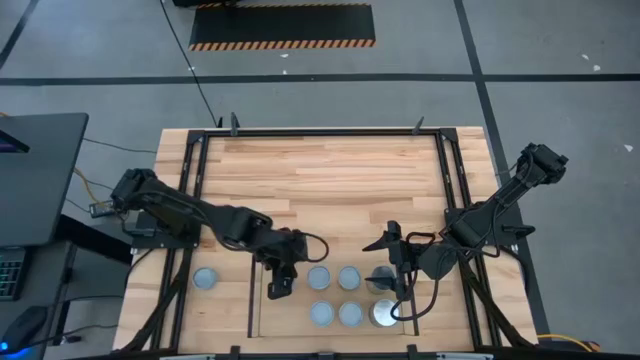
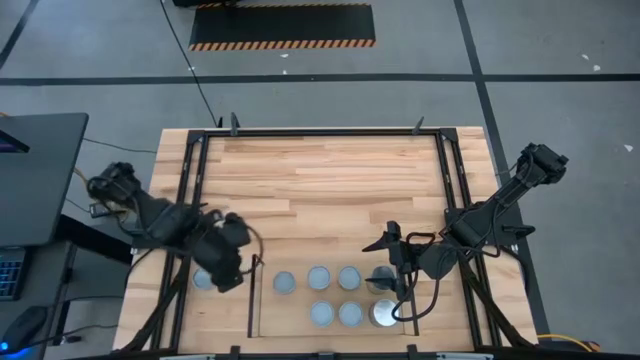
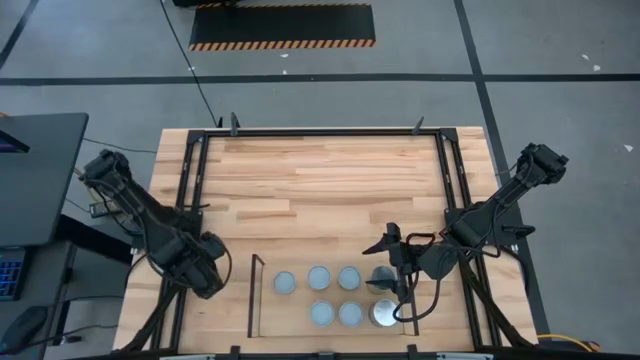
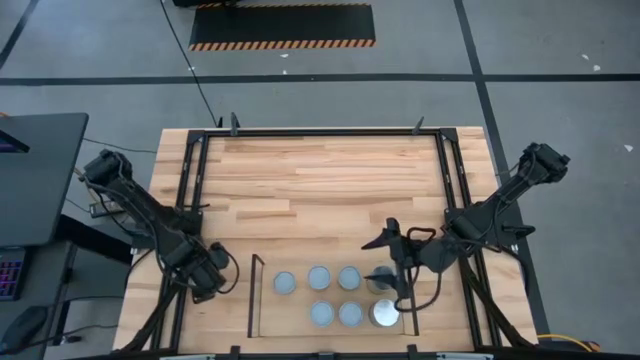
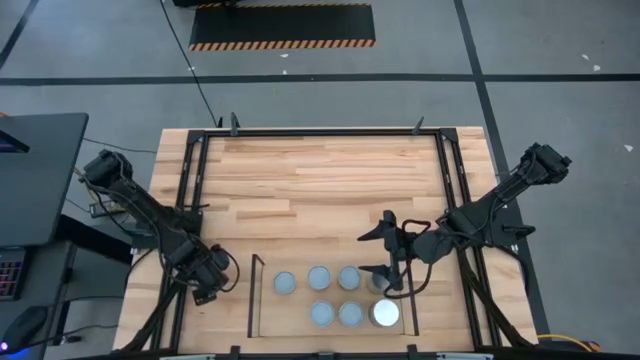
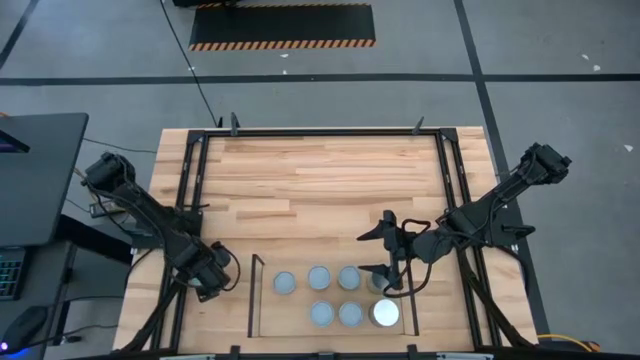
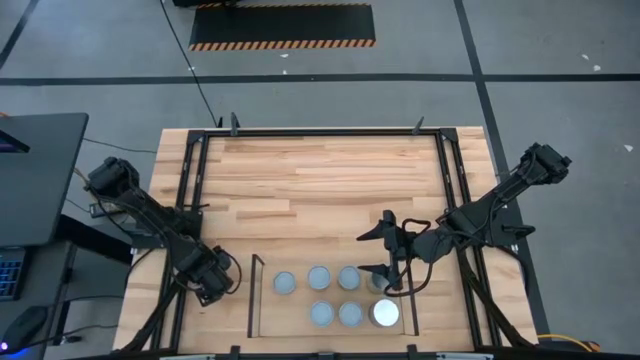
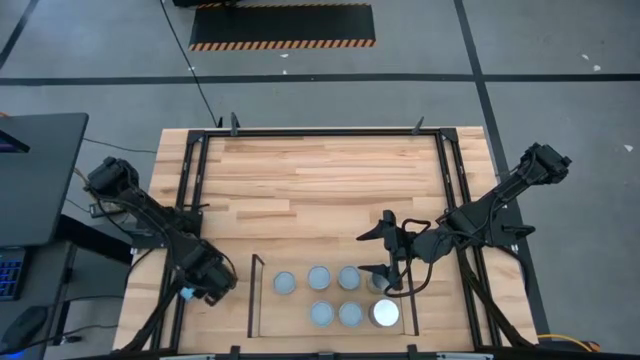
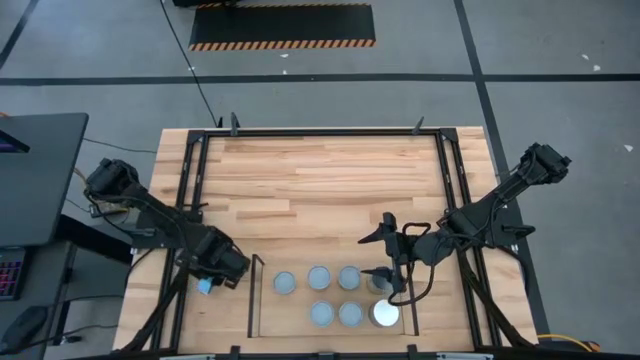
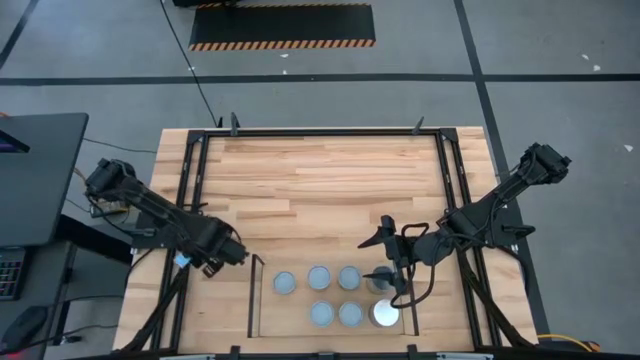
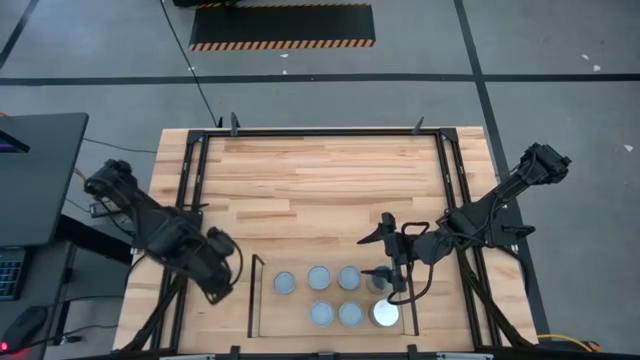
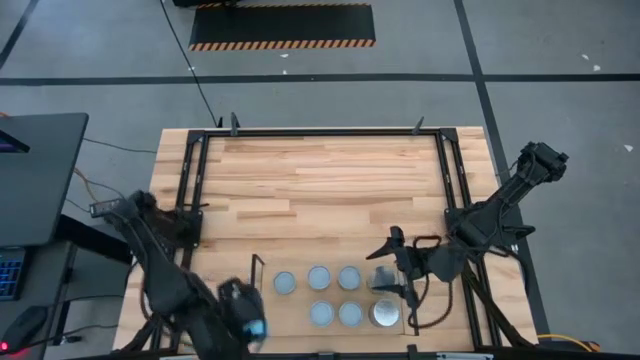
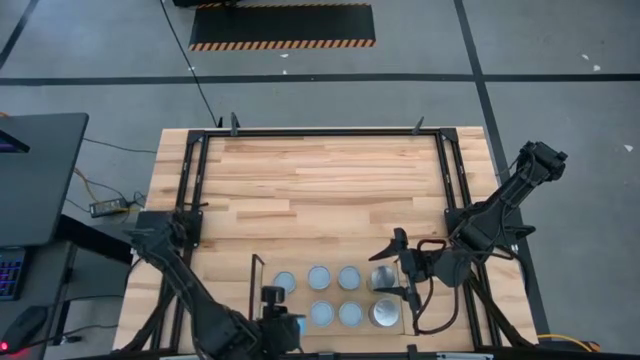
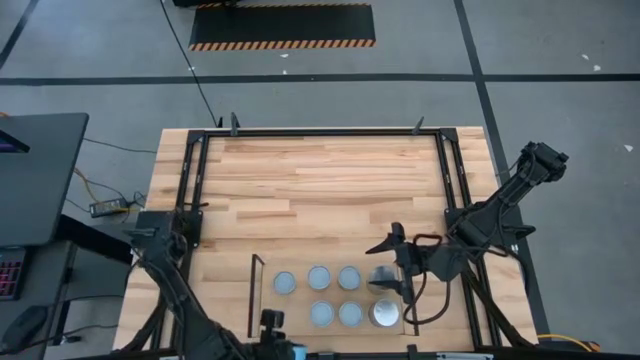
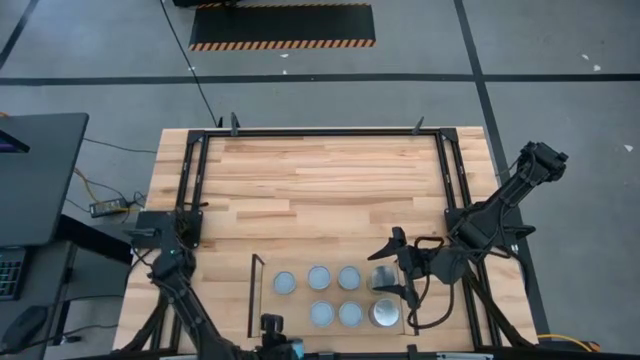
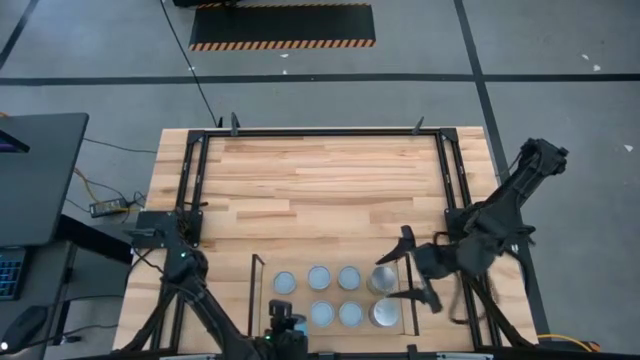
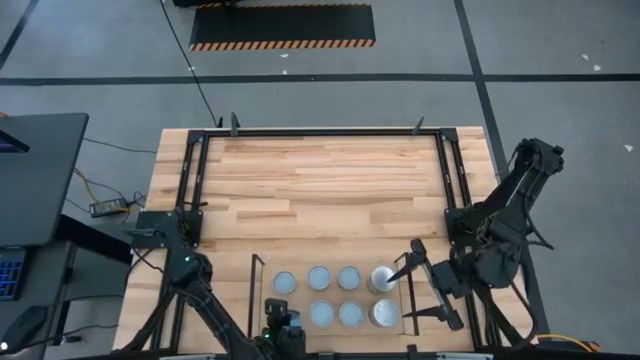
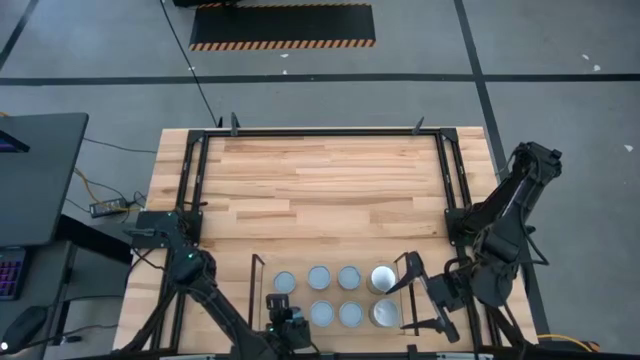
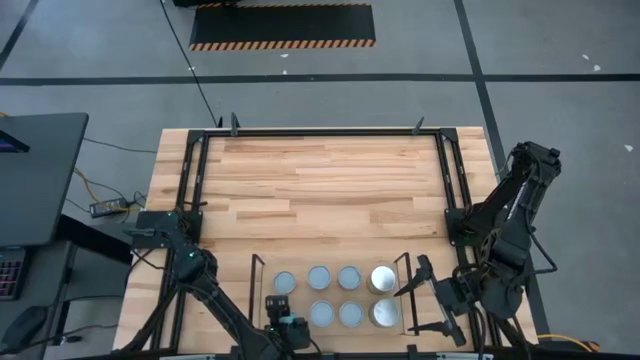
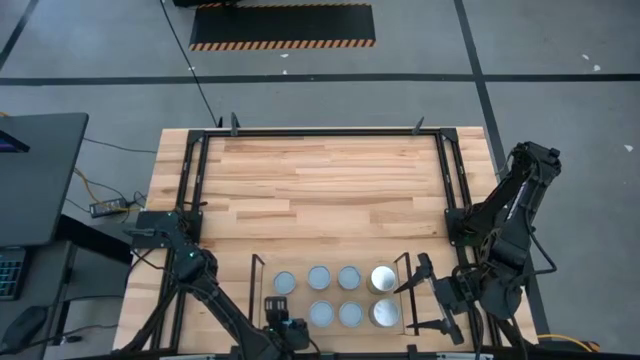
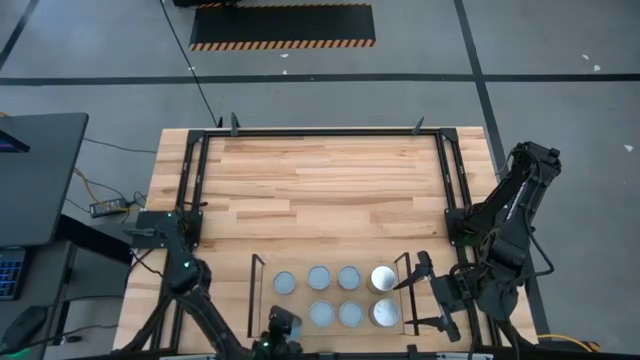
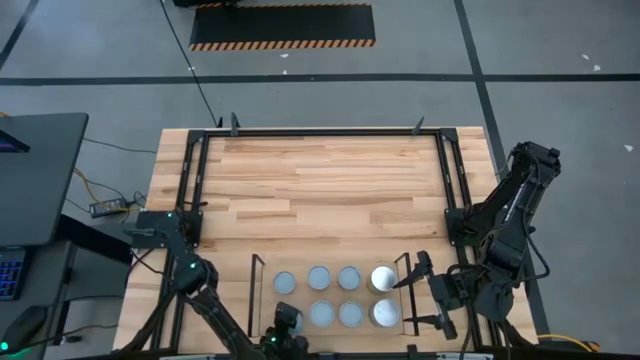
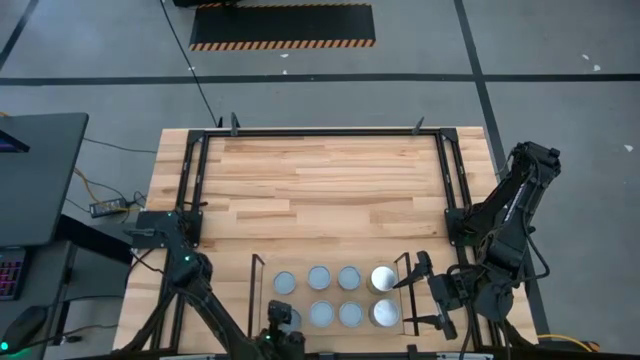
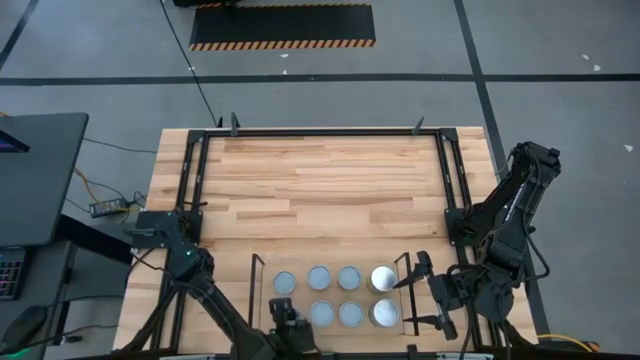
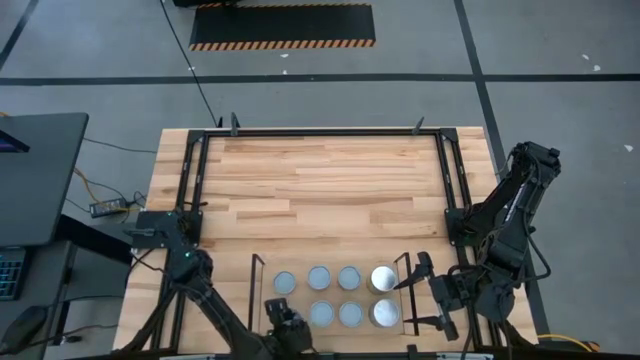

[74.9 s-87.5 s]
Task: Pick and place cans onto a shelf
Put the canned salmon on the shelf

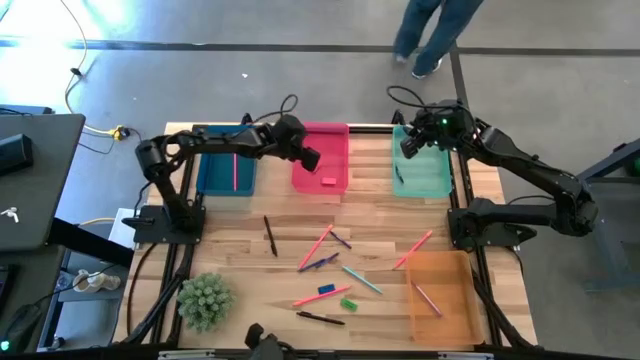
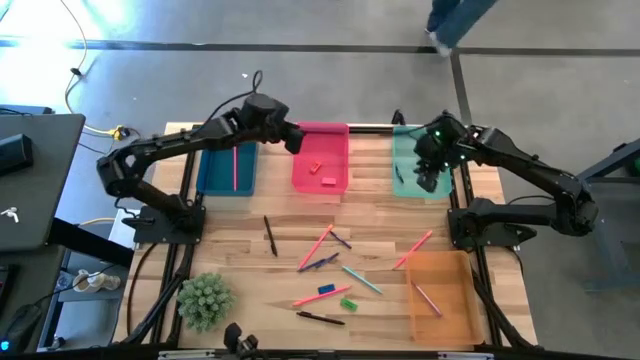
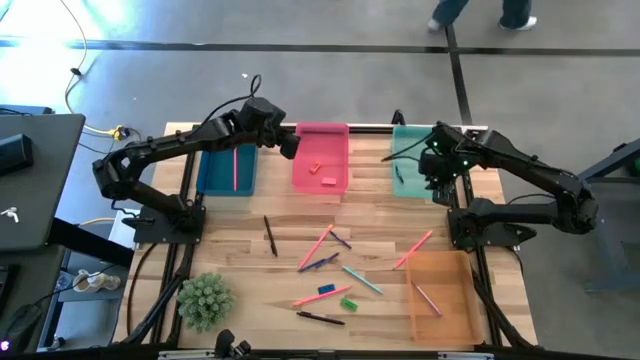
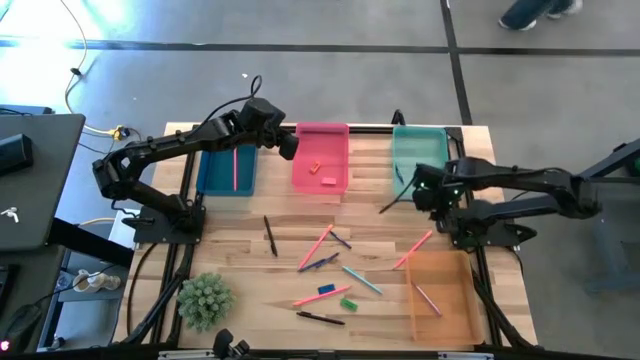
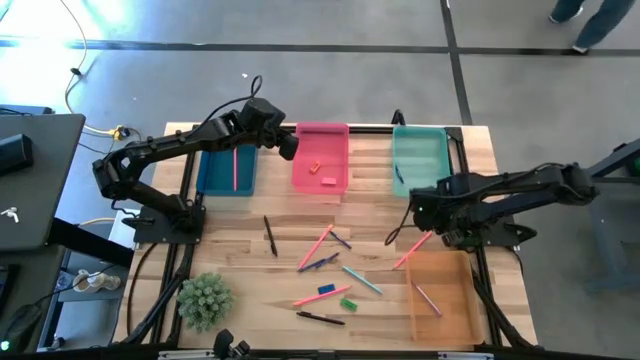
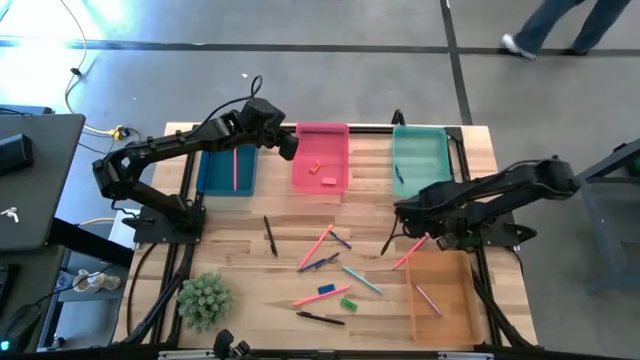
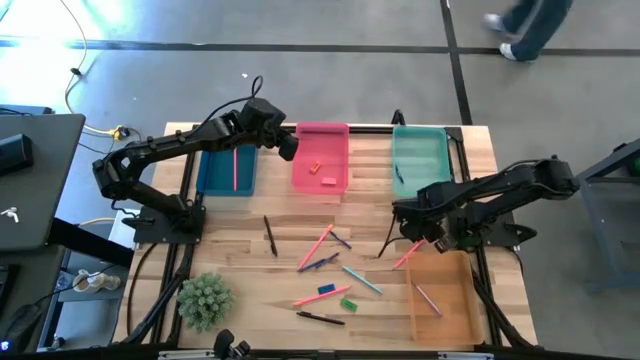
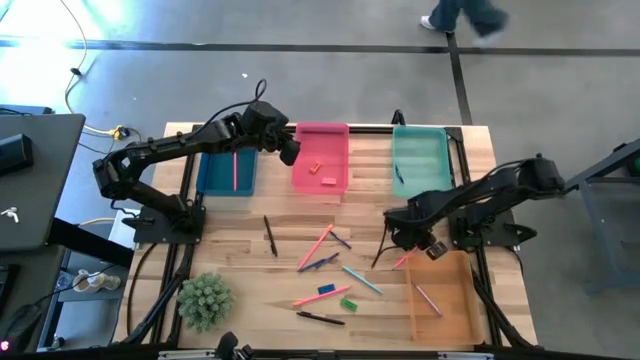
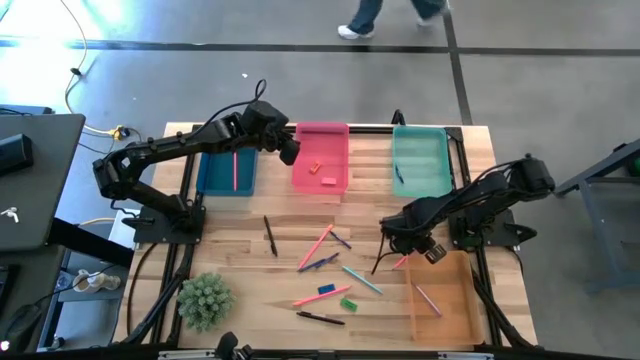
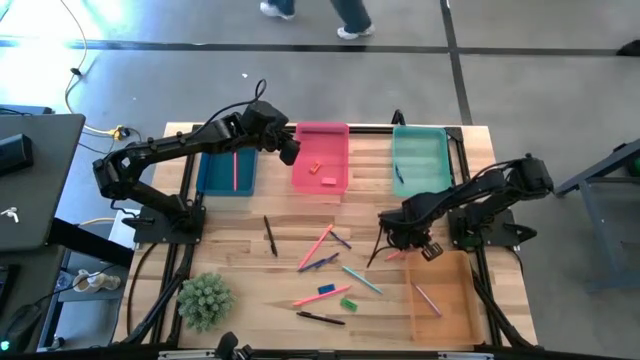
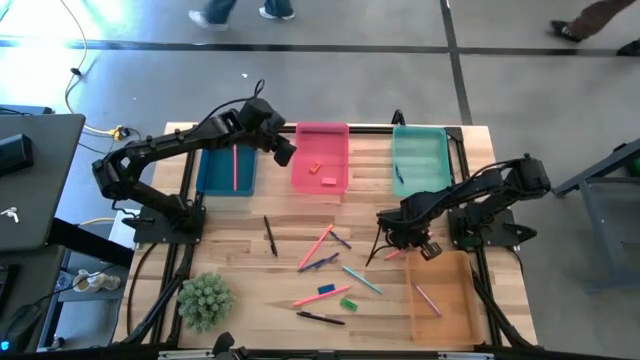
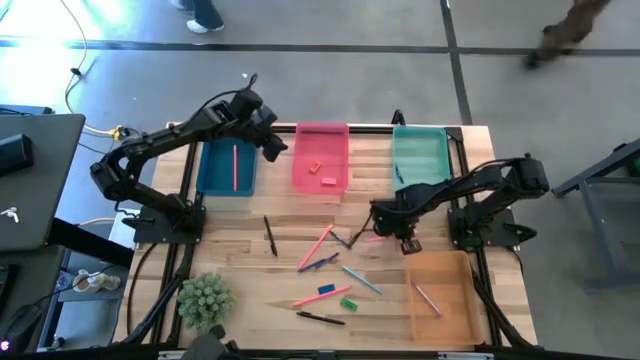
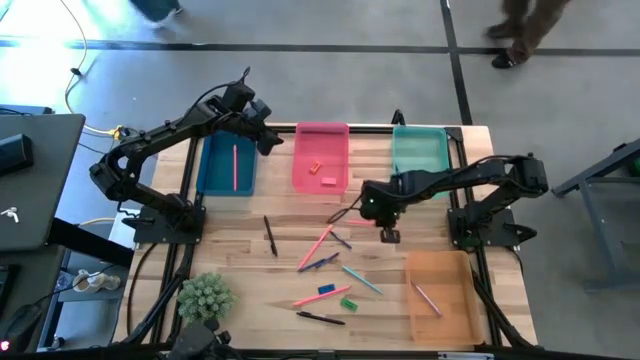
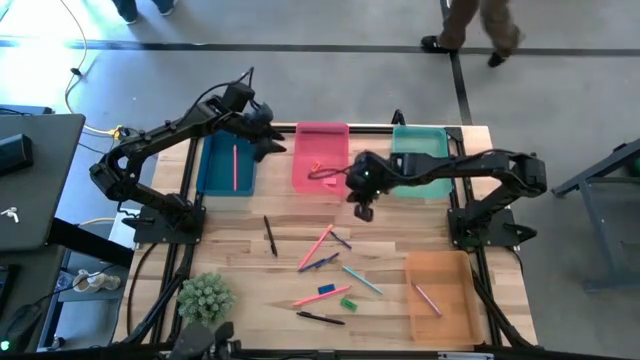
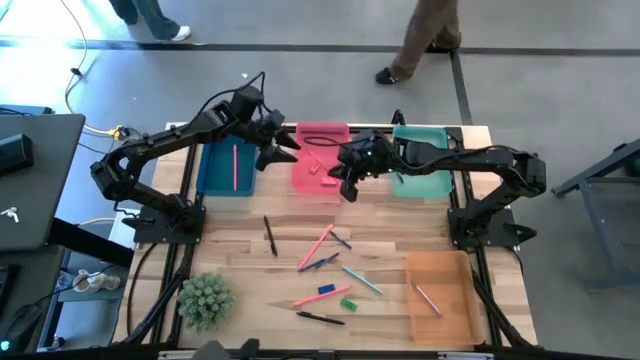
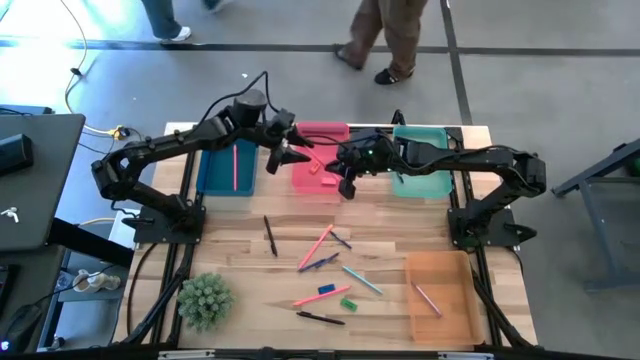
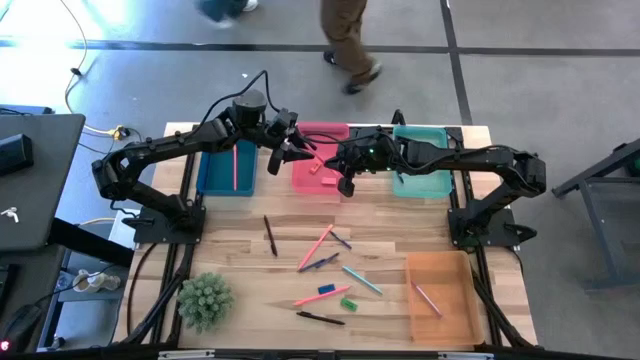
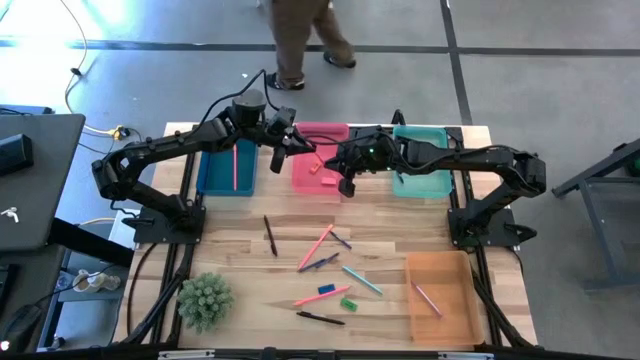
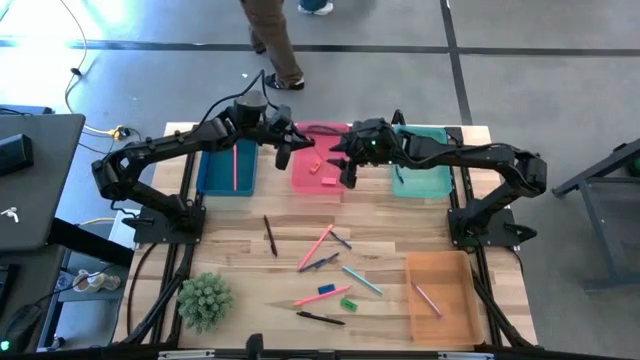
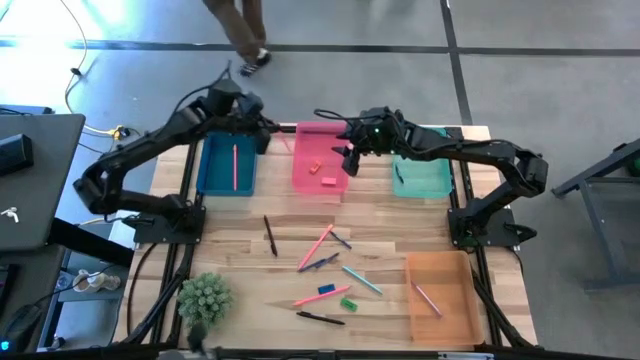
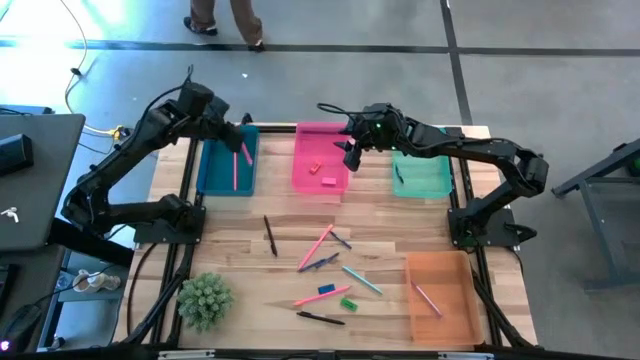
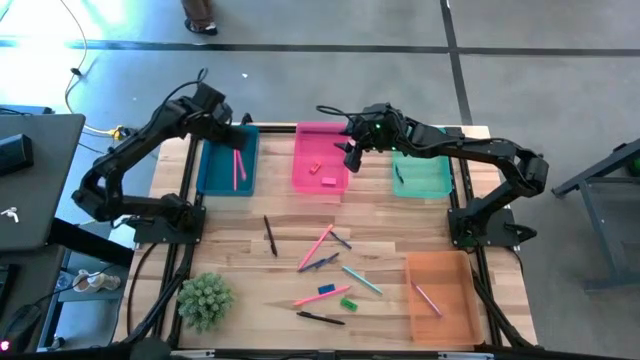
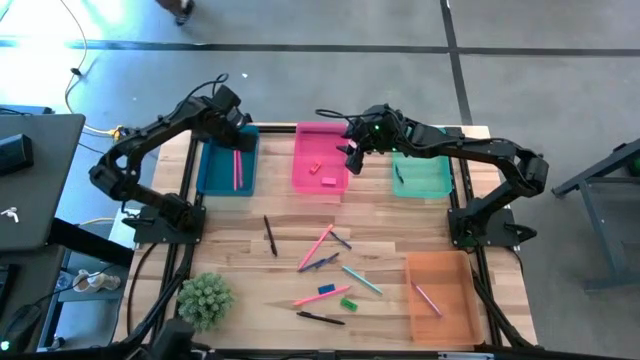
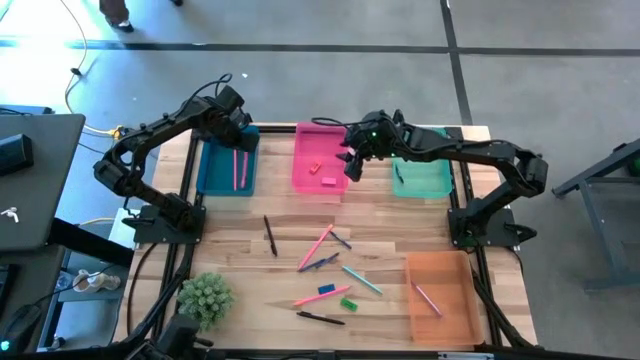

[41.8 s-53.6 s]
Task: Sort crayons/erasers/pens/pencils in bins
Put the pink pencil into the blue bin
